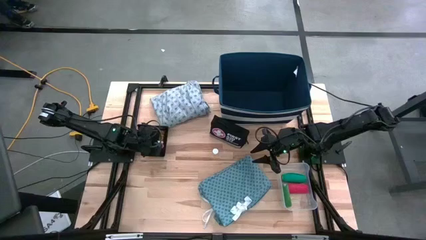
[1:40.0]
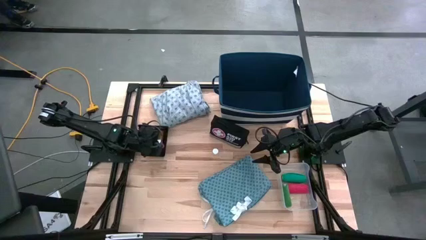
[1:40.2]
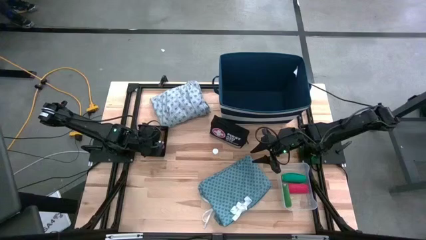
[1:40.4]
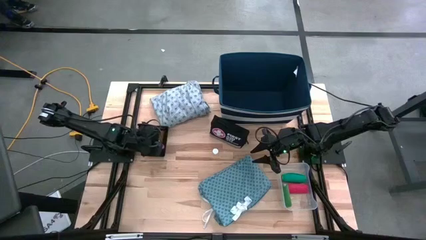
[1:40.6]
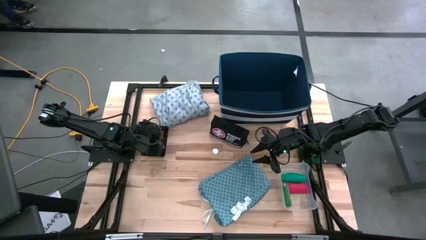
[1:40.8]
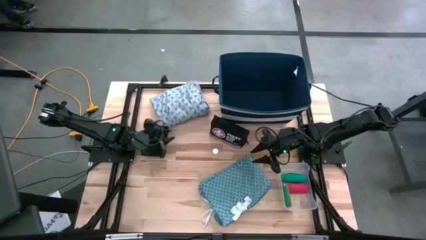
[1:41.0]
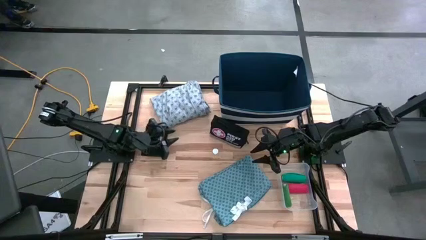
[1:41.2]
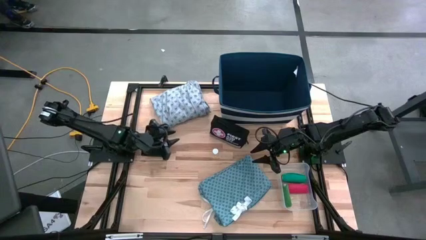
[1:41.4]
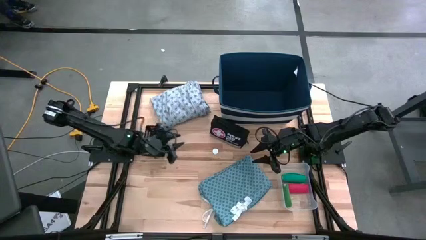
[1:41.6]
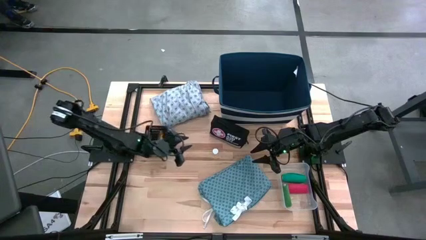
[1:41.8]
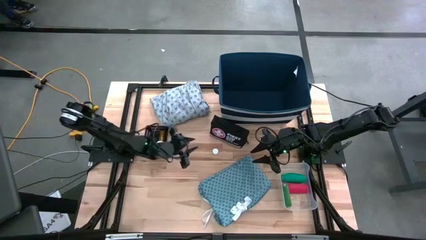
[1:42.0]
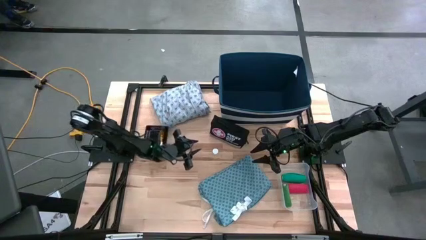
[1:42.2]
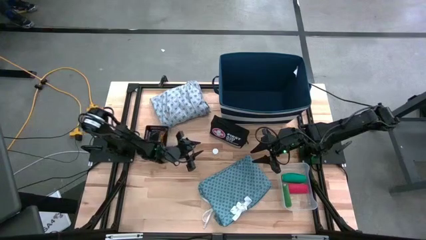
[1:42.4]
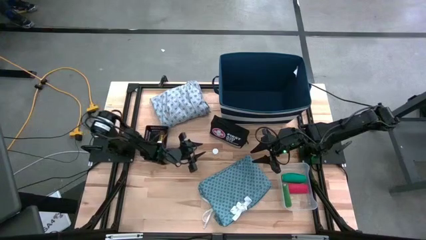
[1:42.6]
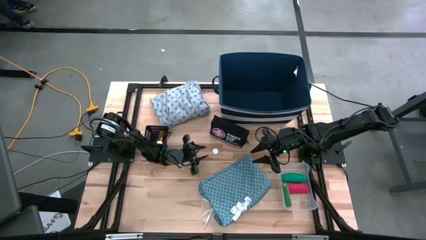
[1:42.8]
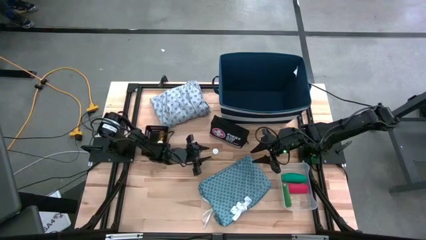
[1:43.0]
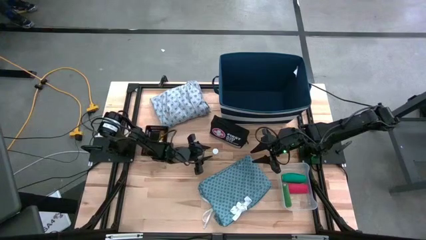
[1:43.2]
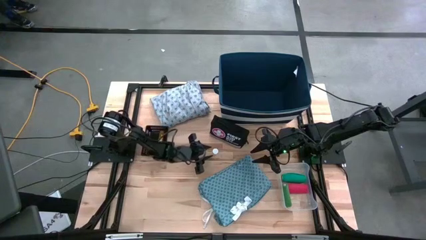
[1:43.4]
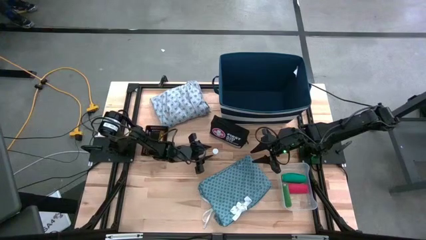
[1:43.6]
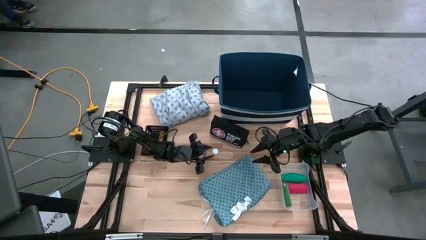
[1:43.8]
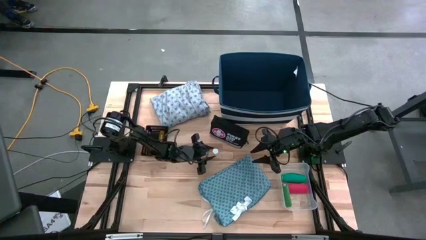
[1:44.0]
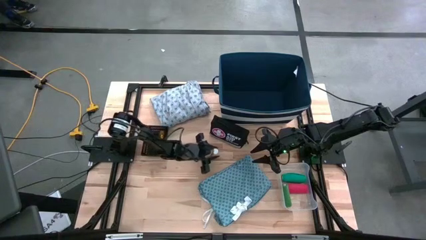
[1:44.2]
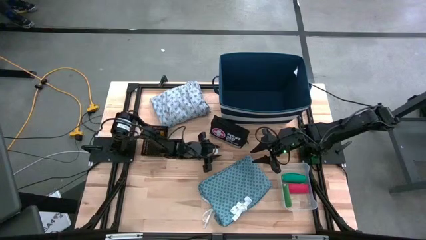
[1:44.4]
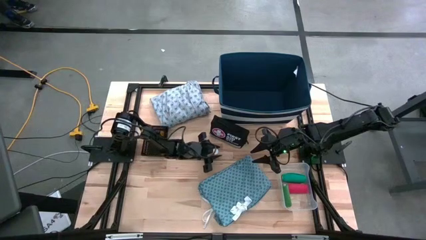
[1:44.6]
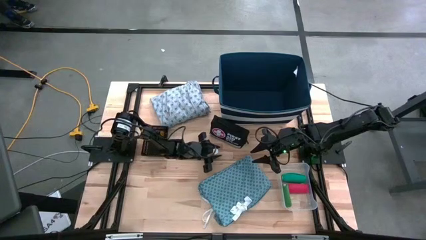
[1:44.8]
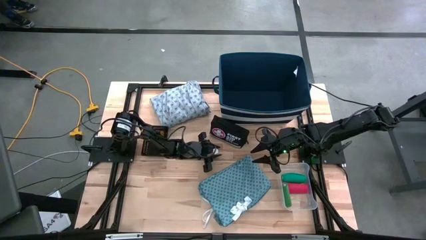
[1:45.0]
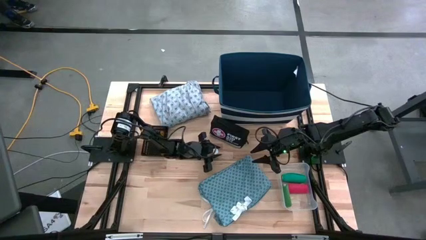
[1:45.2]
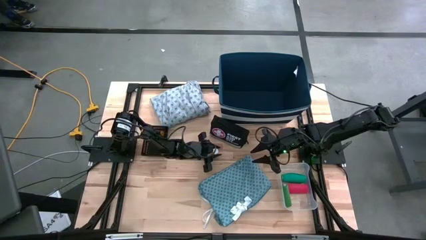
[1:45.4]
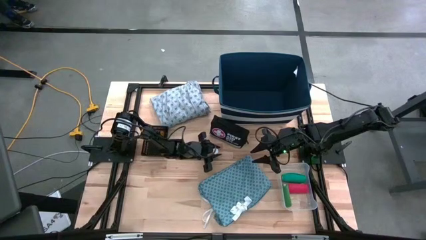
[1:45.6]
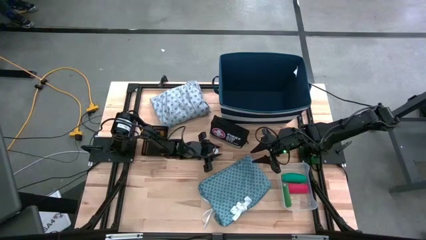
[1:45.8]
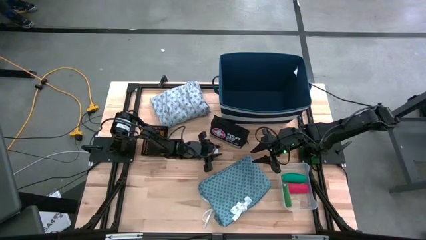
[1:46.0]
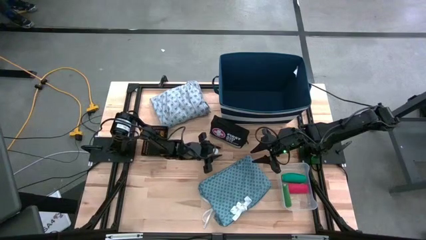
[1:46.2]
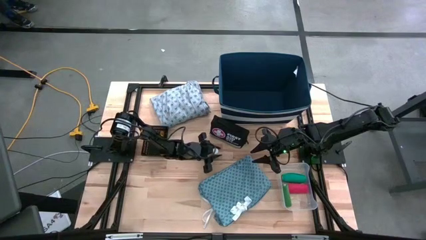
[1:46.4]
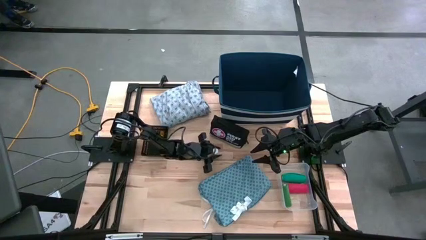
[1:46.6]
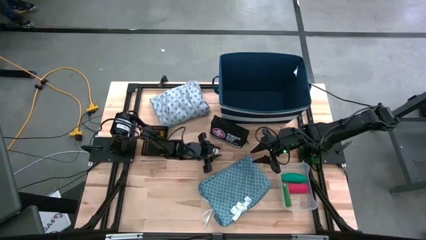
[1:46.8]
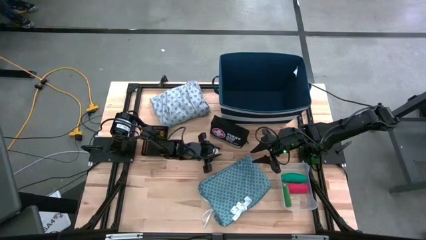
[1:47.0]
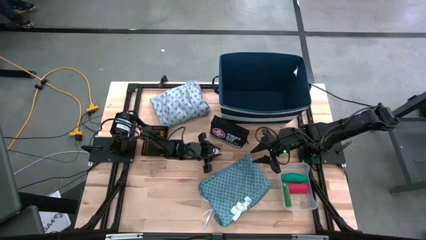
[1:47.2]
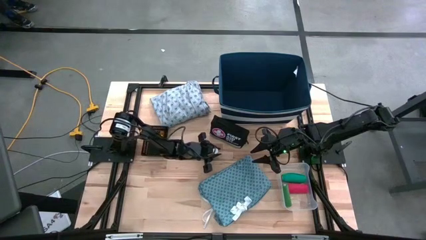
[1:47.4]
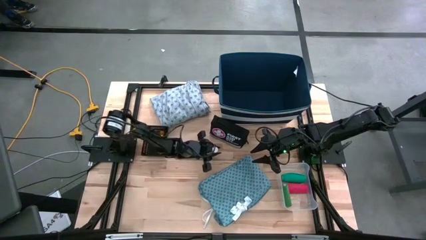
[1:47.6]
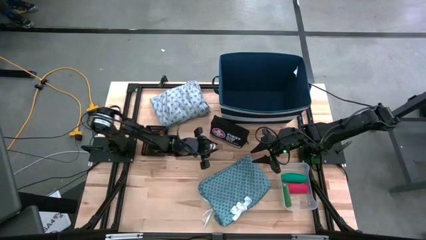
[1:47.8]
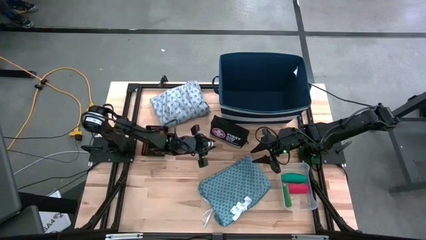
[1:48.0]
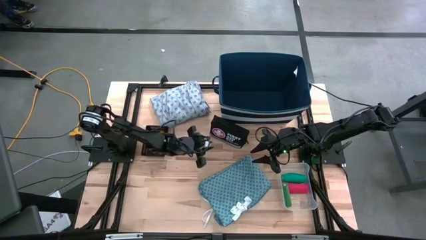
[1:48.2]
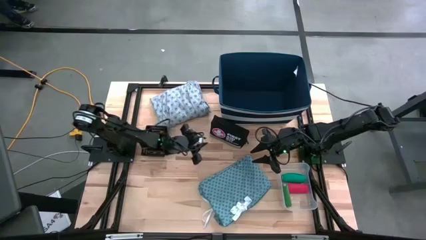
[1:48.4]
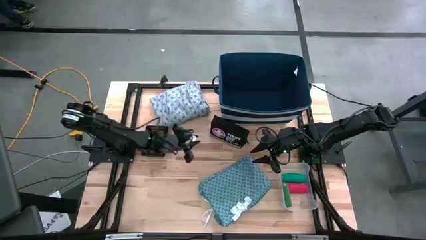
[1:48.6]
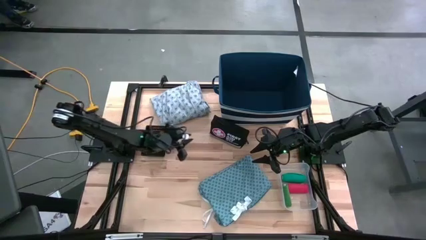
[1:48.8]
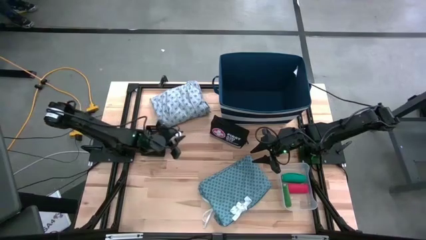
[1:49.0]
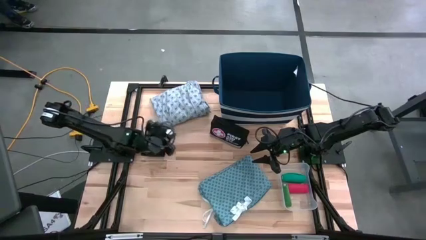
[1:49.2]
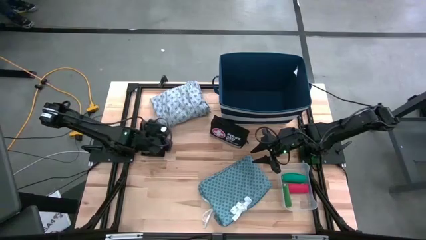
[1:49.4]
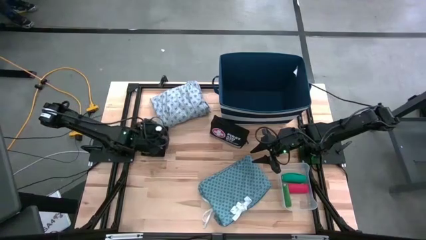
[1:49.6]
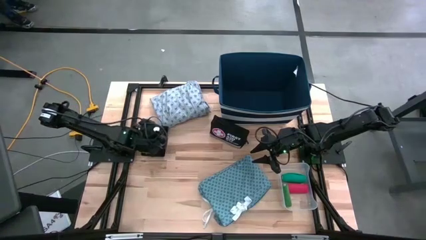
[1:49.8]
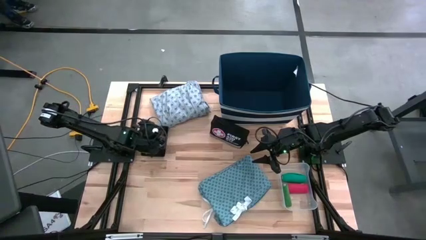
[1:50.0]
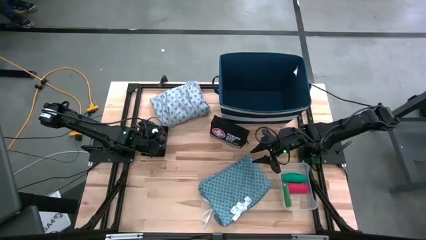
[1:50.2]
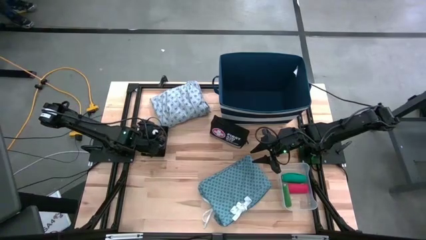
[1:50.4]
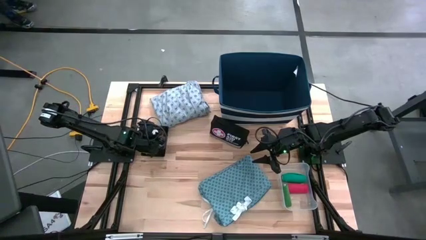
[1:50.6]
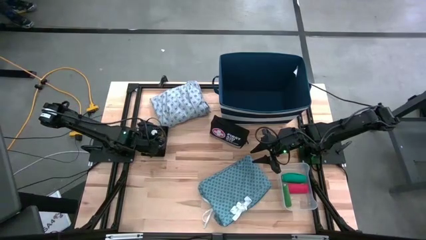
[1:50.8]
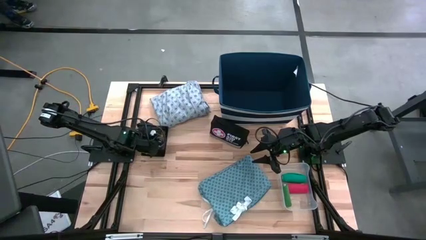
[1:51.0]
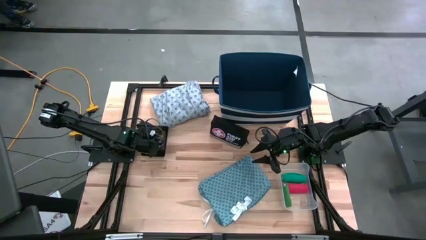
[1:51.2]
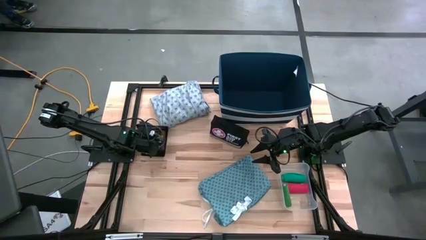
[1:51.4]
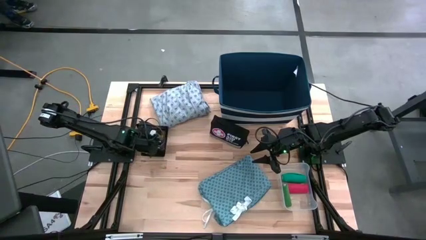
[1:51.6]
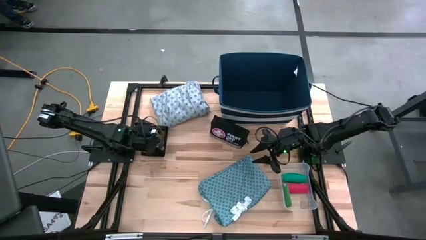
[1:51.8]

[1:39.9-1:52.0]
Task: Pick & place medical supplies in basket/bin
Put the yellow pill bottle into the black bin
